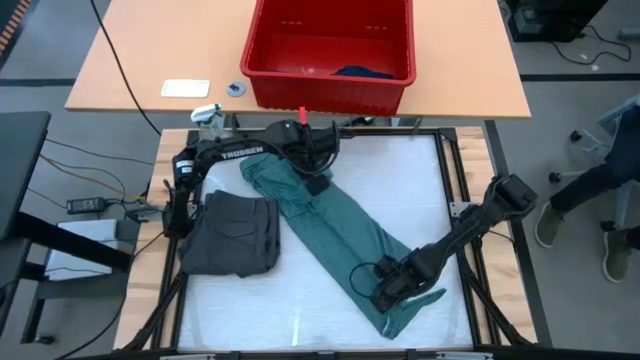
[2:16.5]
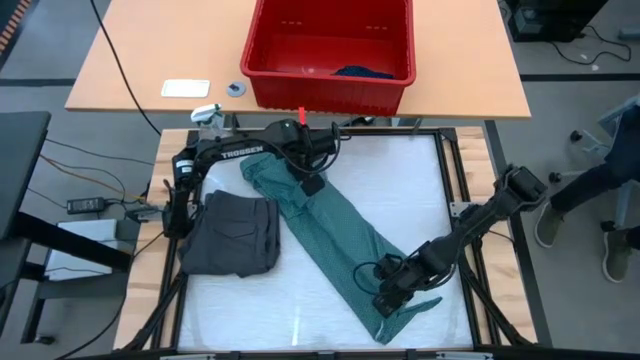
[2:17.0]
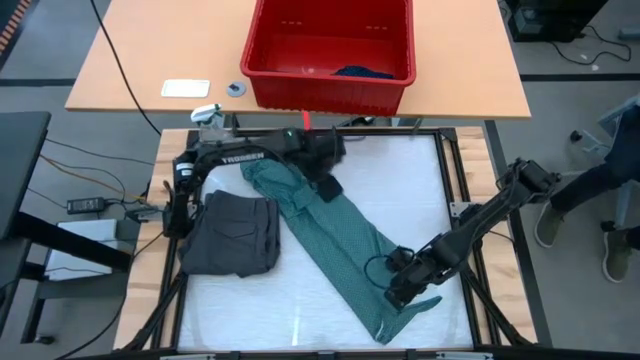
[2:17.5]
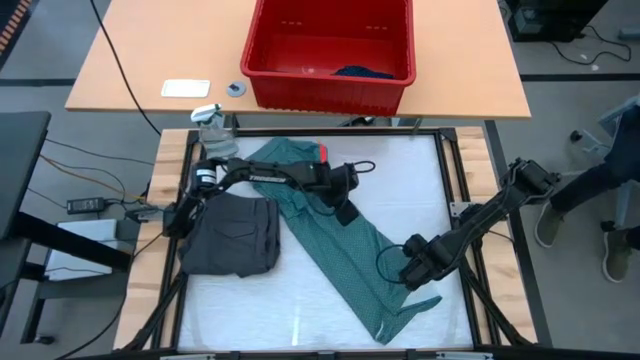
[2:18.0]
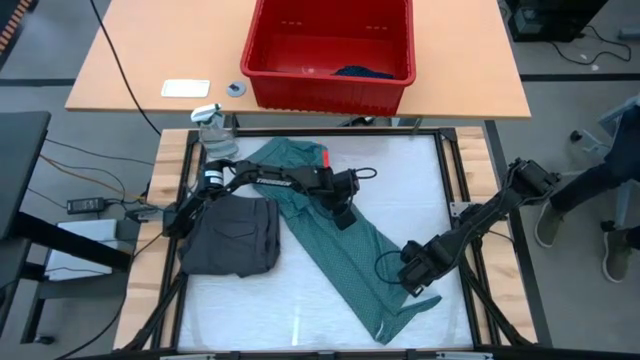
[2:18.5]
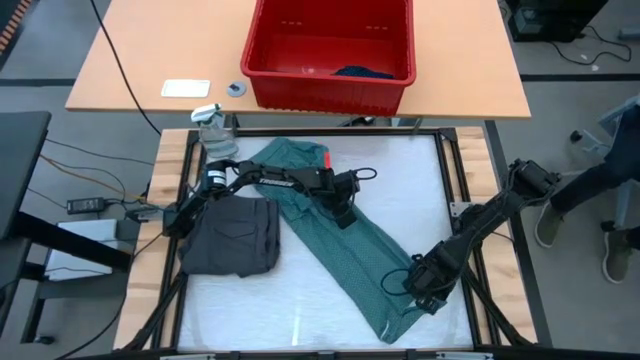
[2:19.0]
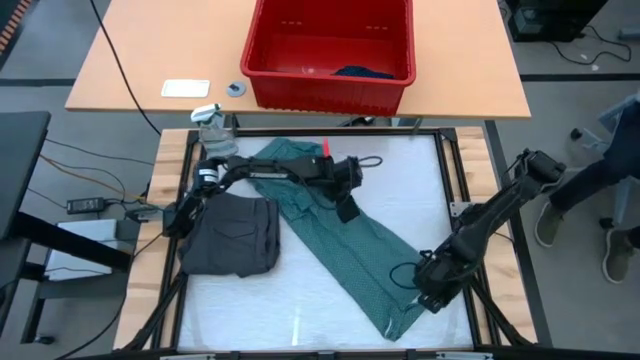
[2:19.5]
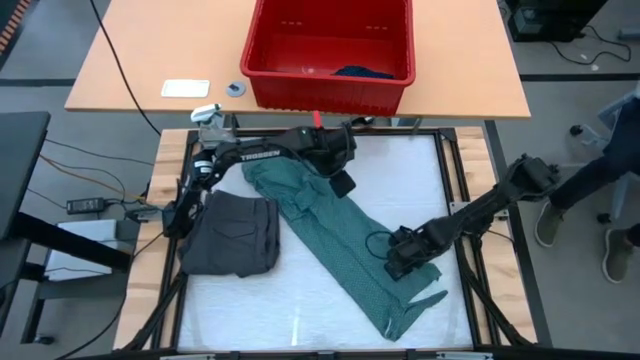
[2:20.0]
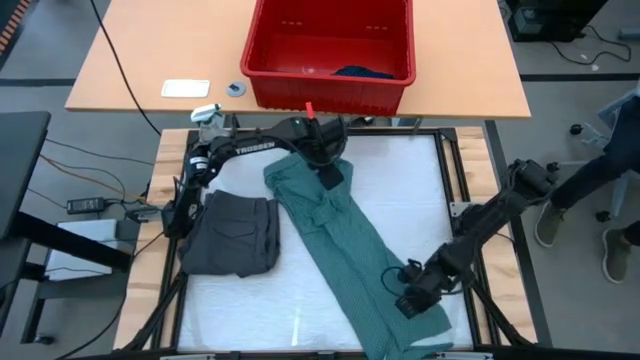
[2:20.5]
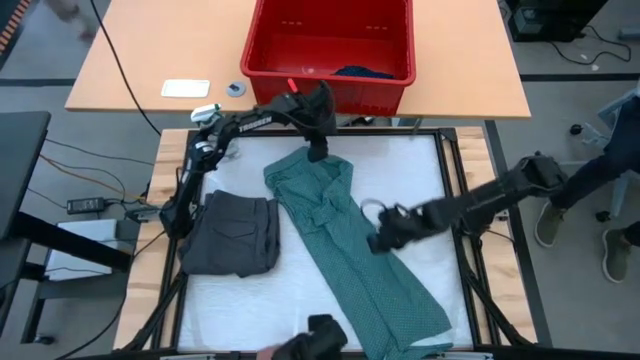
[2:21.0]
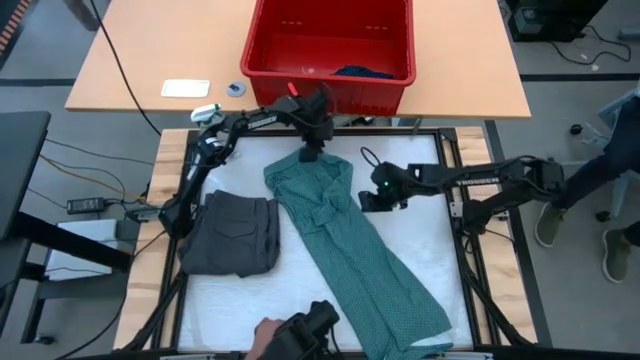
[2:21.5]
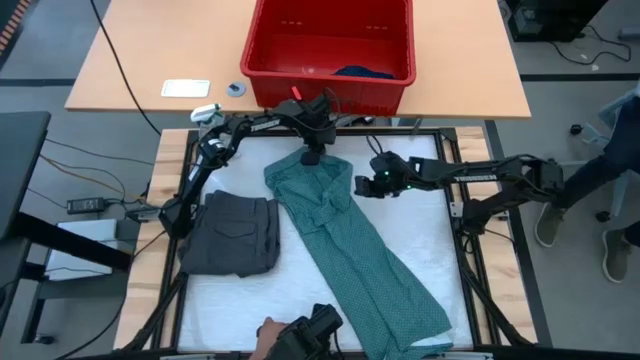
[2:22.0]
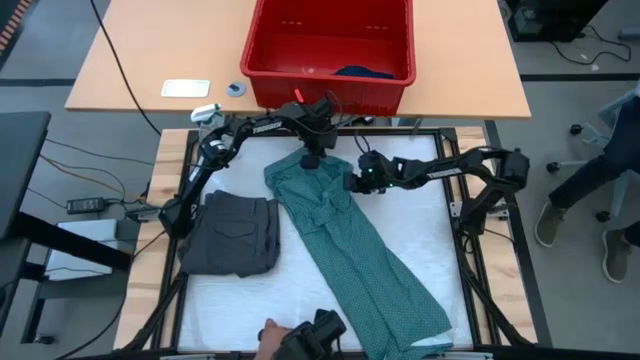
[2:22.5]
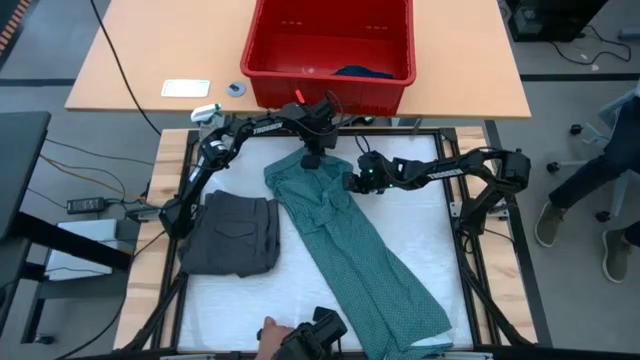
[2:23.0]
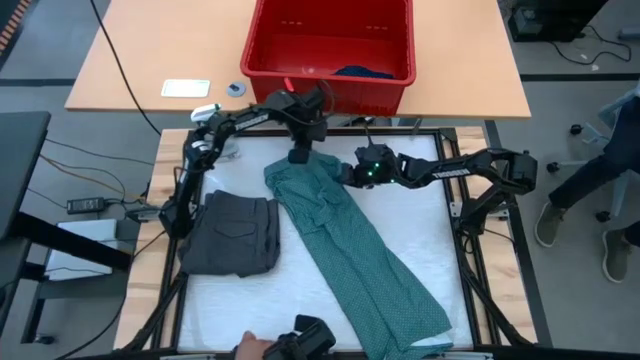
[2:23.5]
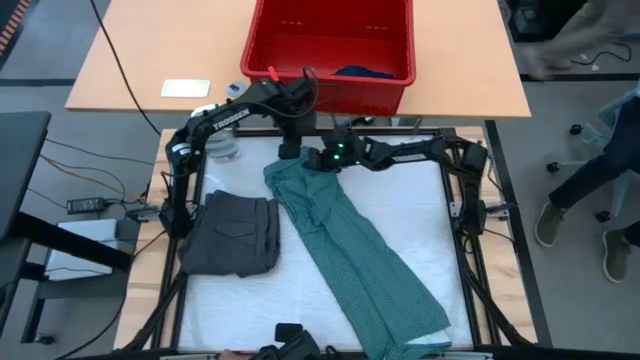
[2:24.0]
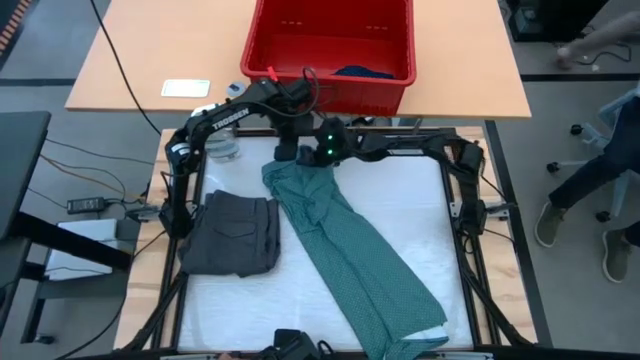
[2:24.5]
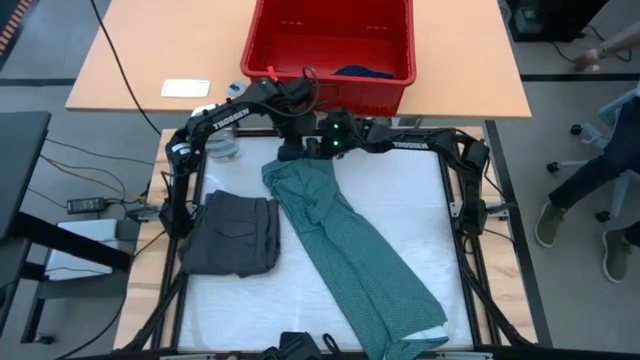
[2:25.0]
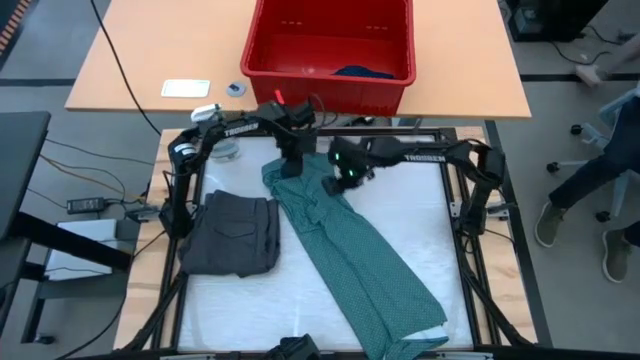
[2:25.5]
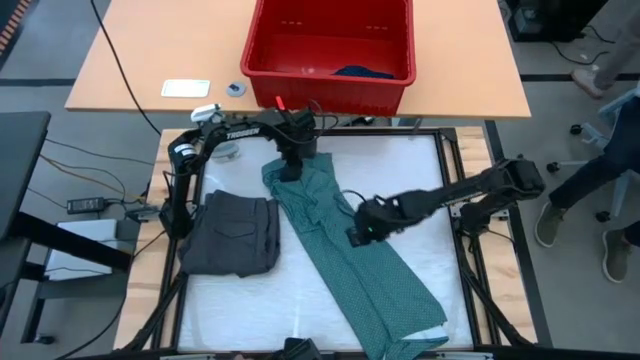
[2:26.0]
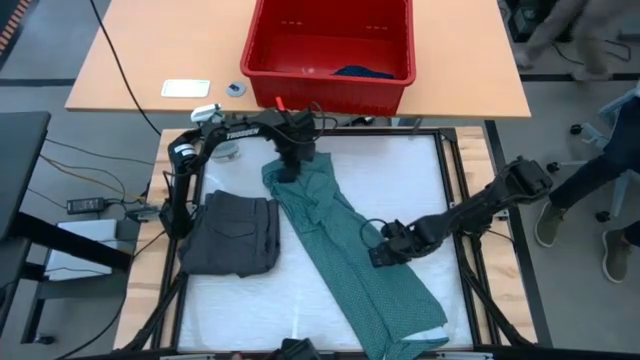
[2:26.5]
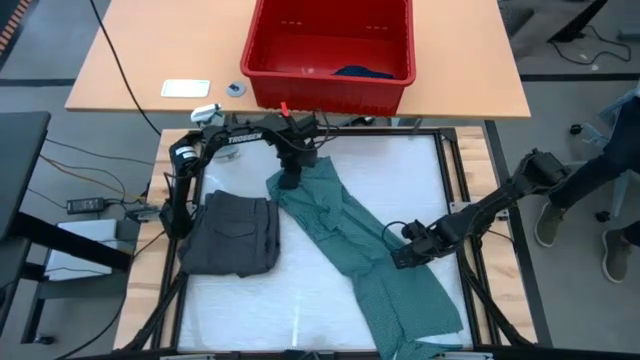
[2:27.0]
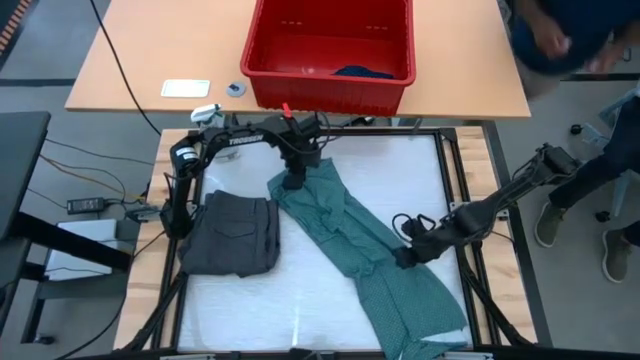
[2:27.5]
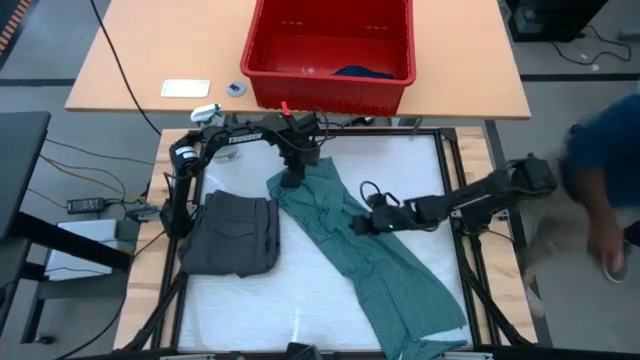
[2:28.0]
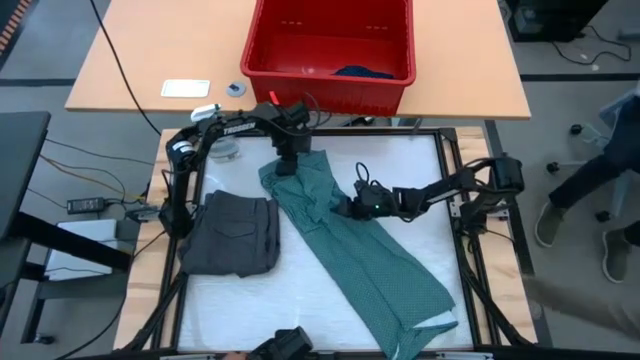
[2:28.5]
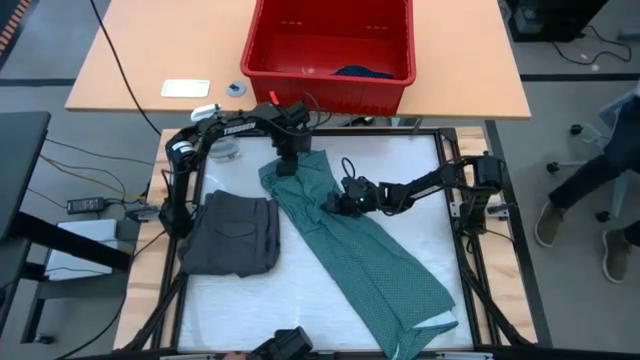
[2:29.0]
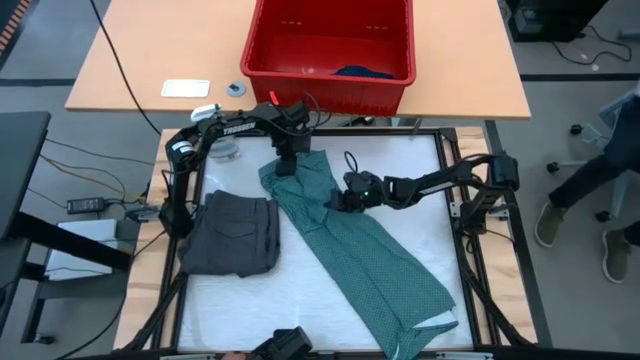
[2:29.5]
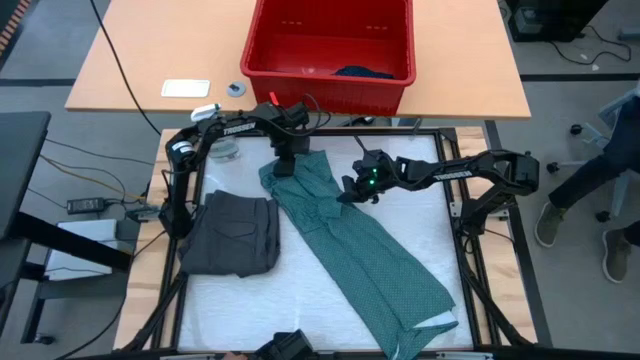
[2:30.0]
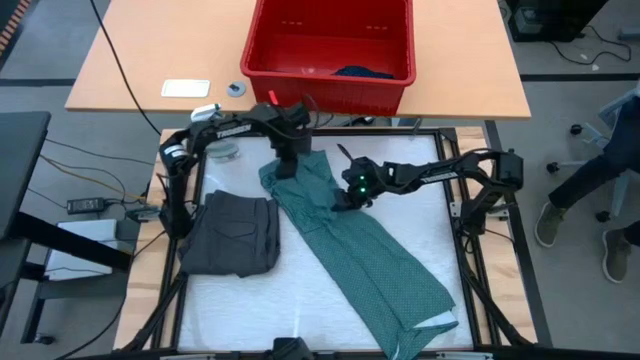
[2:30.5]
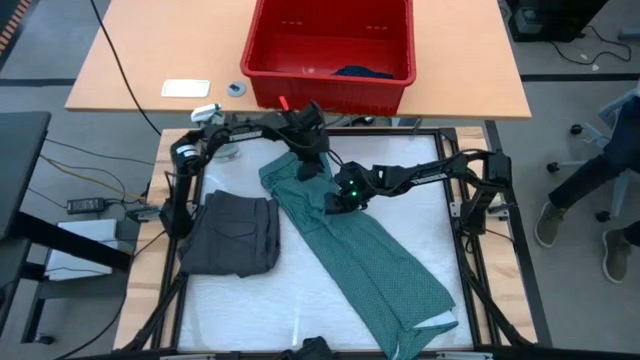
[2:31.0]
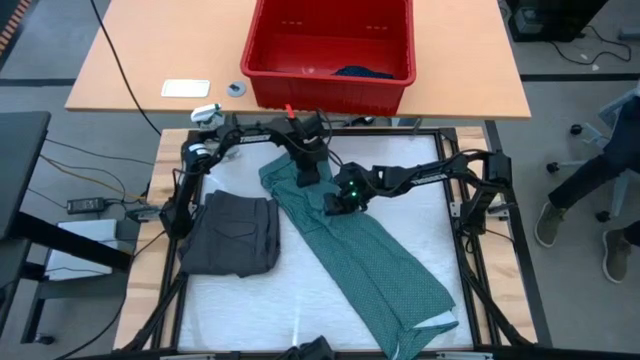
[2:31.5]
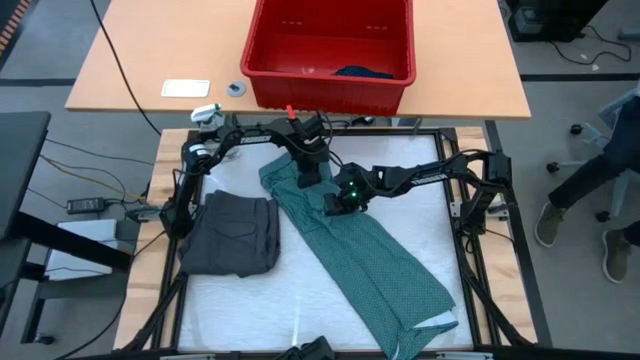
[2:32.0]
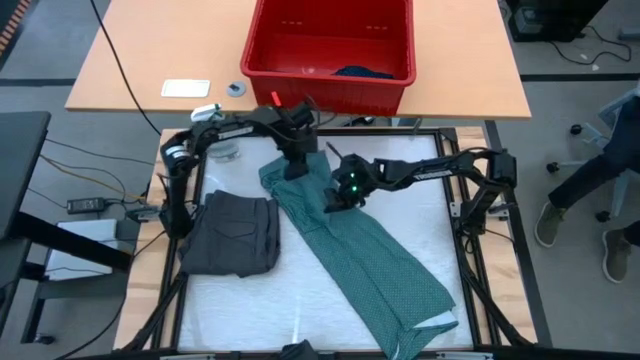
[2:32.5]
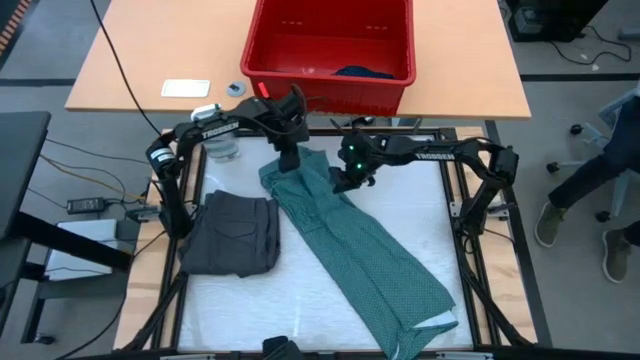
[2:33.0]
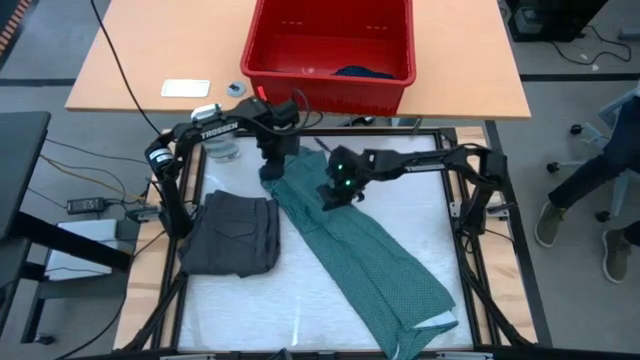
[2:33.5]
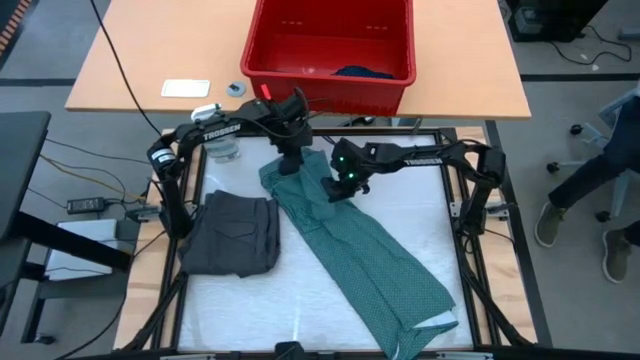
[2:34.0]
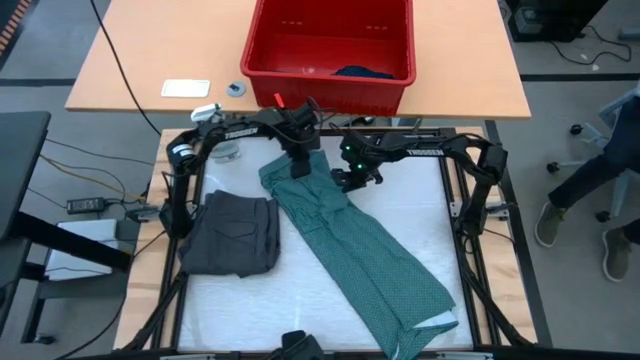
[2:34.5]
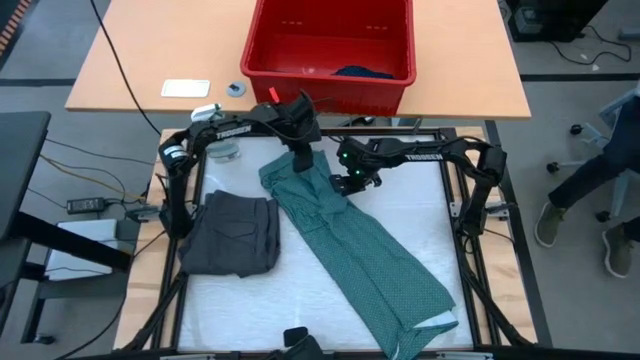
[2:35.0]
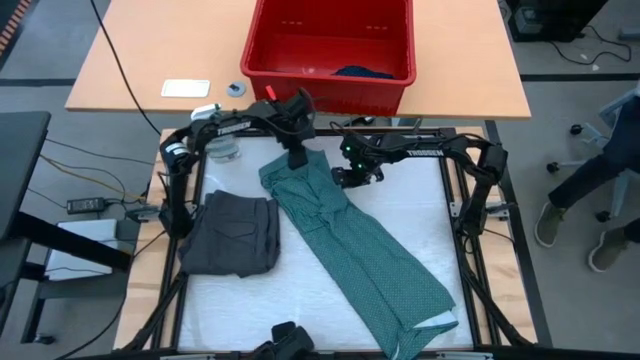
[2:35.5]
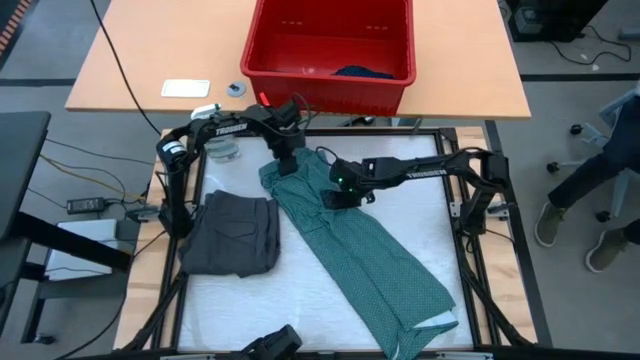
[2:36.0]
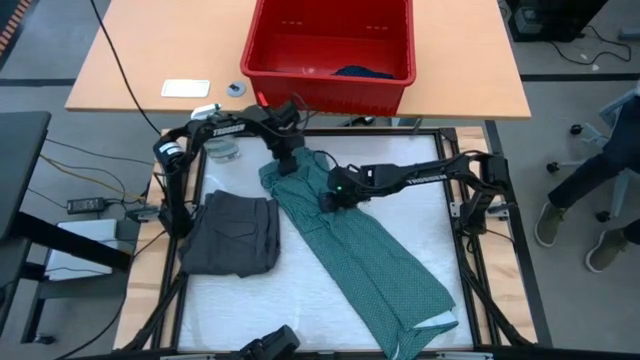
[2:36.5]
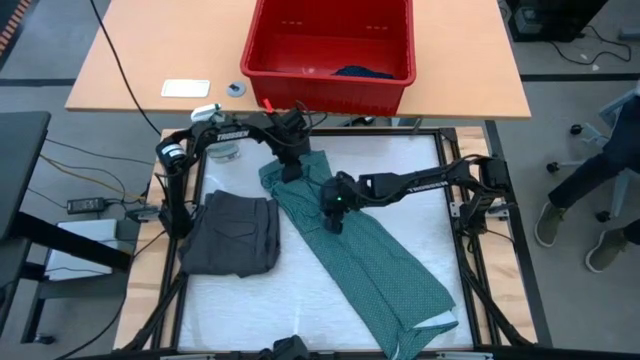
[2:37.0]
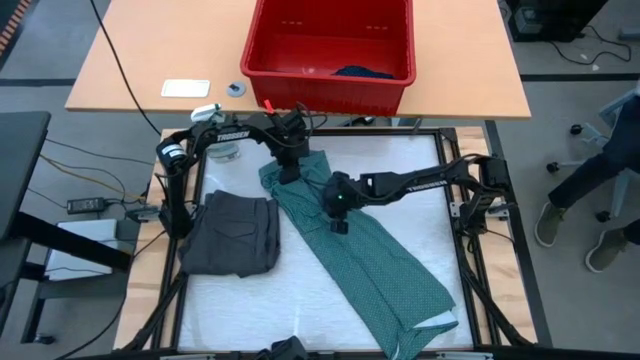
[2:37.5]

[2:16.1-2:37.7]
Task: Fold Laundry from Bin
Fold the green polo shirt on the table
